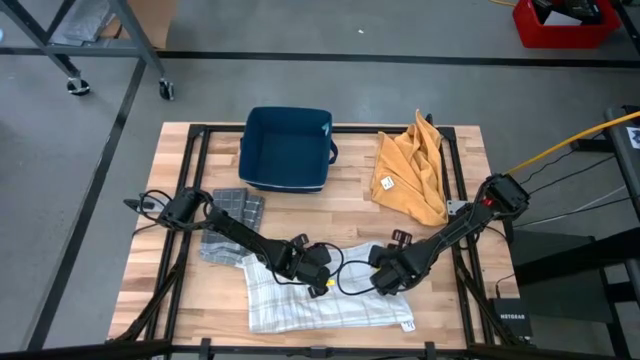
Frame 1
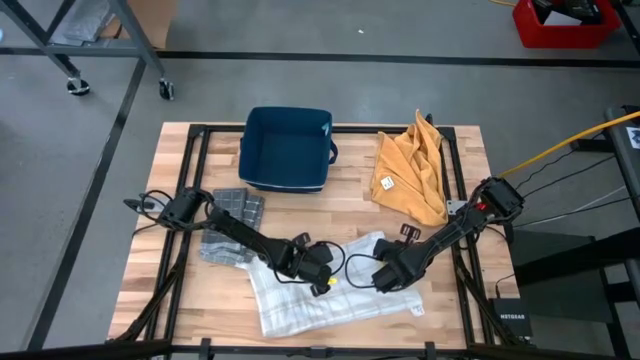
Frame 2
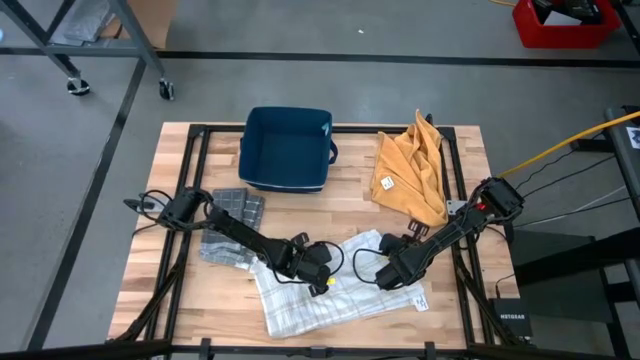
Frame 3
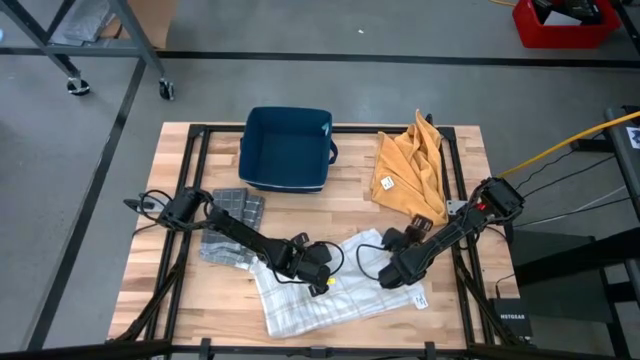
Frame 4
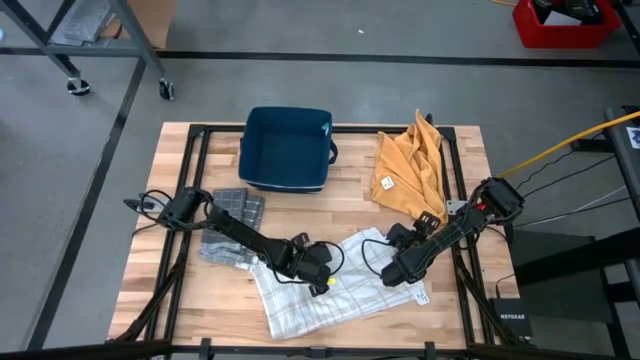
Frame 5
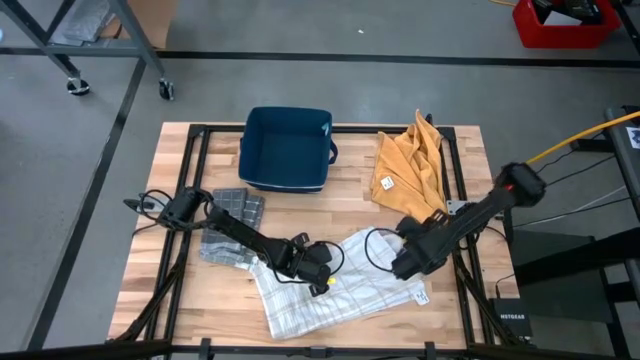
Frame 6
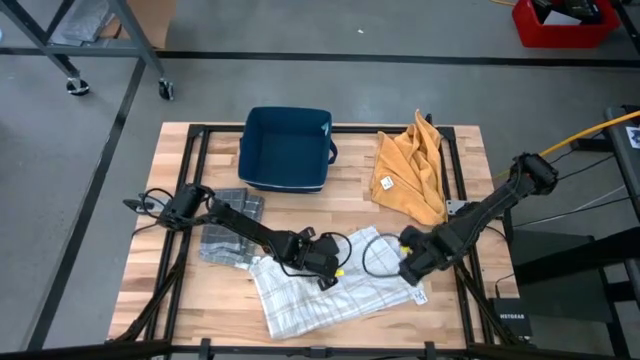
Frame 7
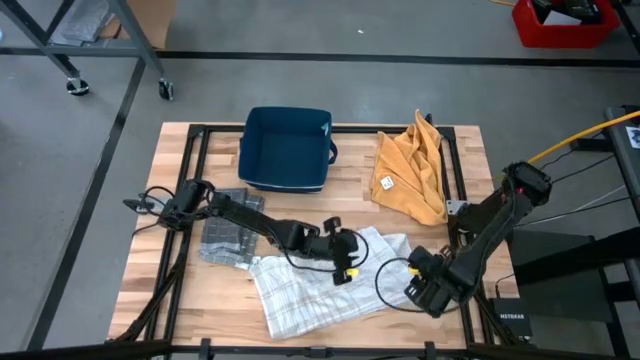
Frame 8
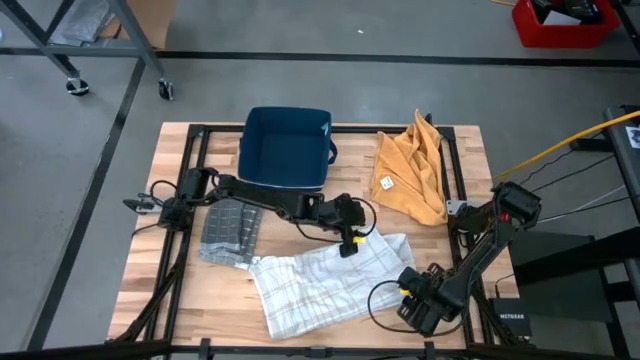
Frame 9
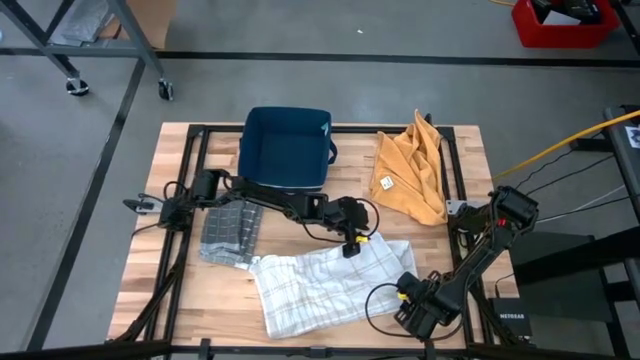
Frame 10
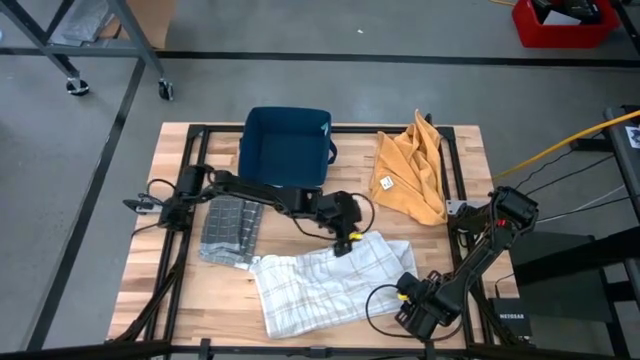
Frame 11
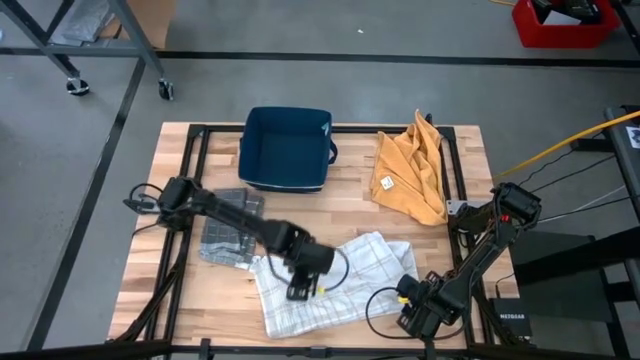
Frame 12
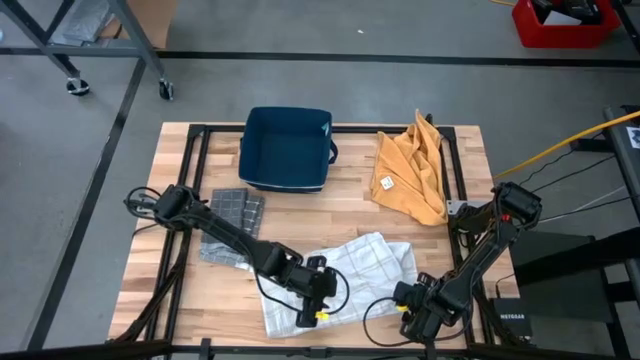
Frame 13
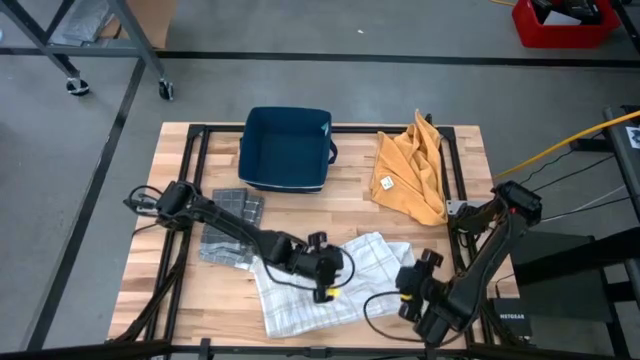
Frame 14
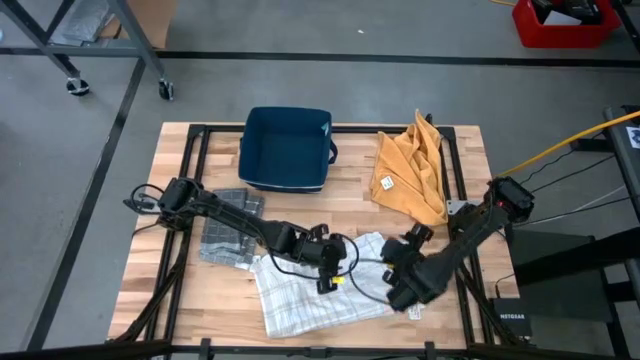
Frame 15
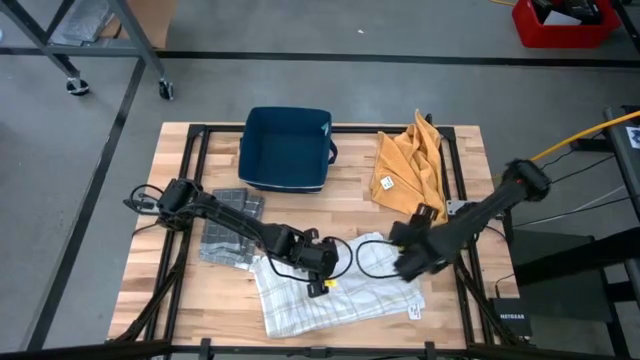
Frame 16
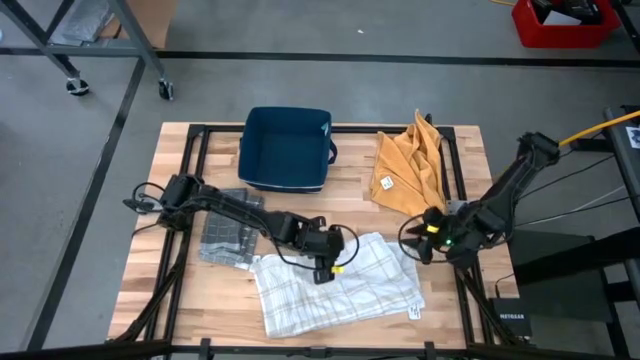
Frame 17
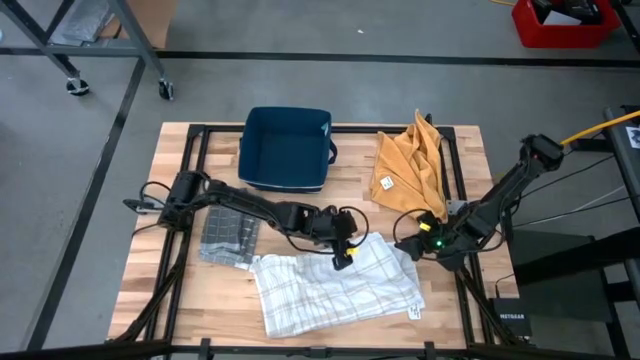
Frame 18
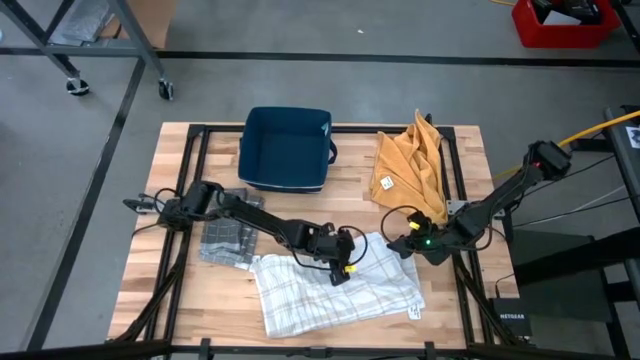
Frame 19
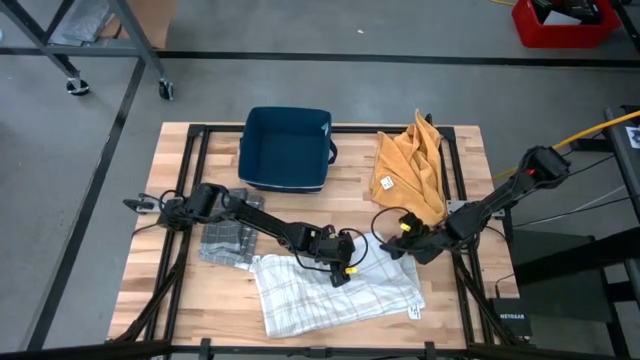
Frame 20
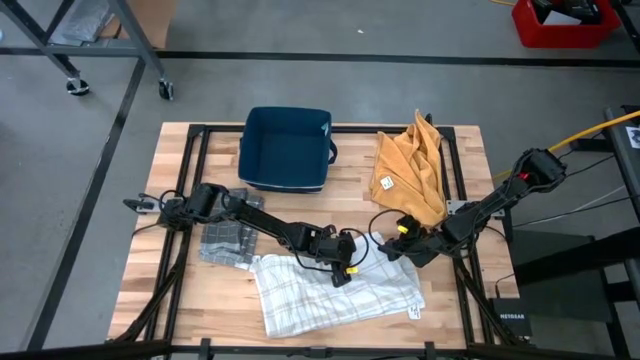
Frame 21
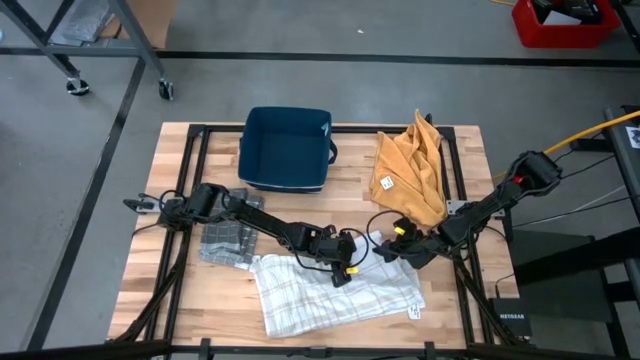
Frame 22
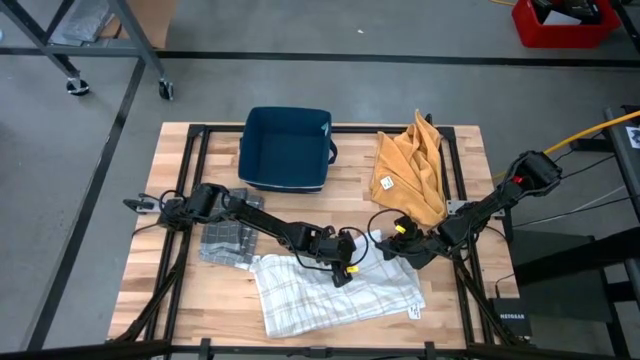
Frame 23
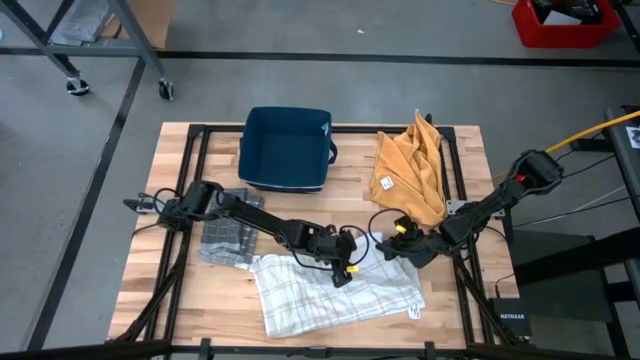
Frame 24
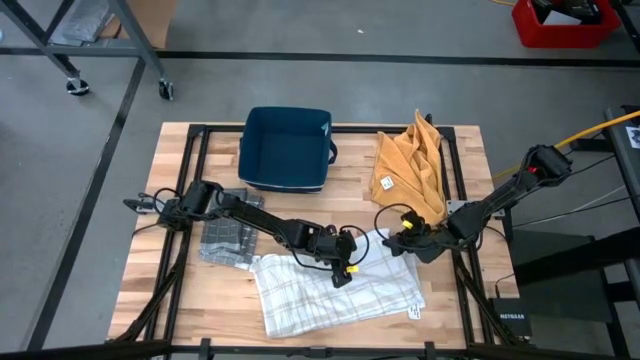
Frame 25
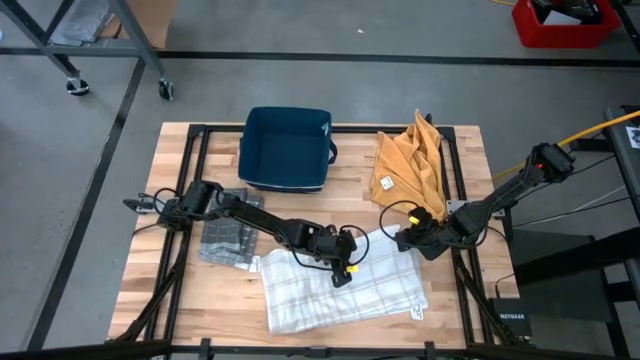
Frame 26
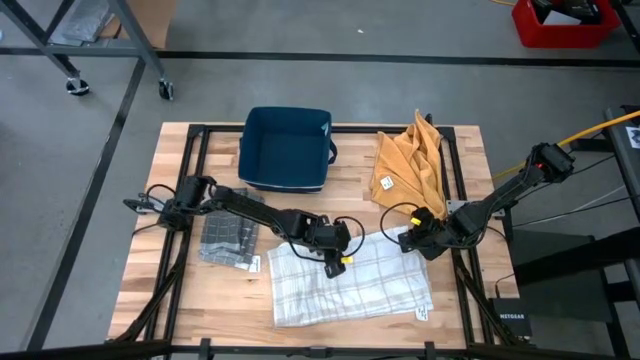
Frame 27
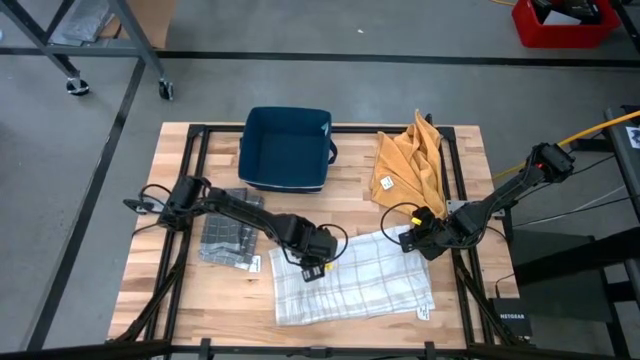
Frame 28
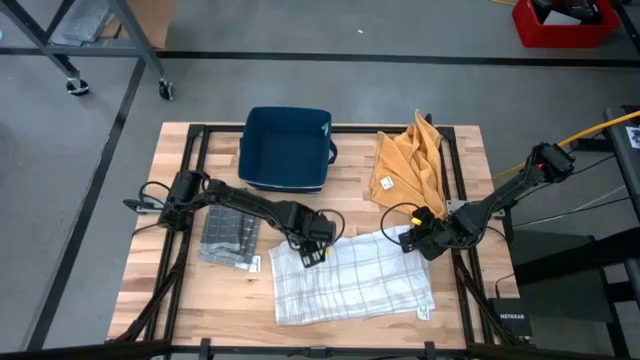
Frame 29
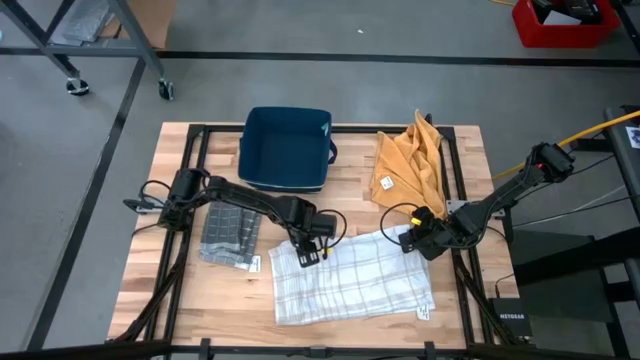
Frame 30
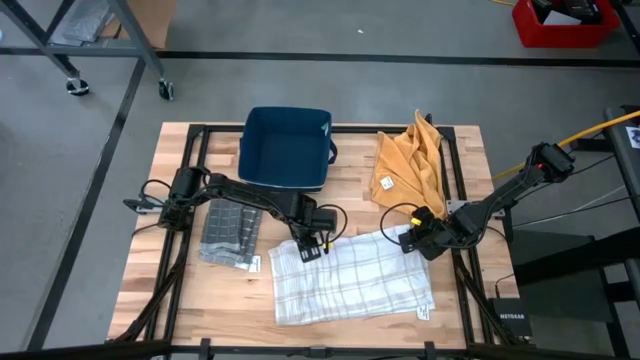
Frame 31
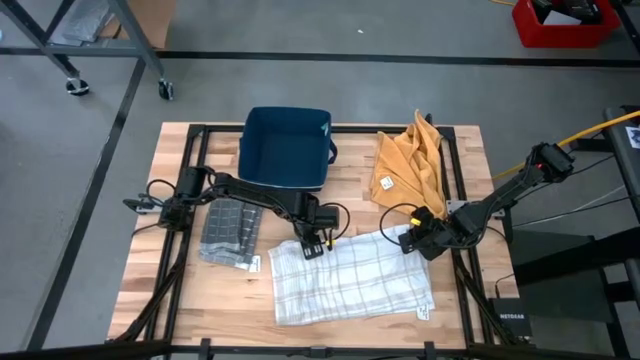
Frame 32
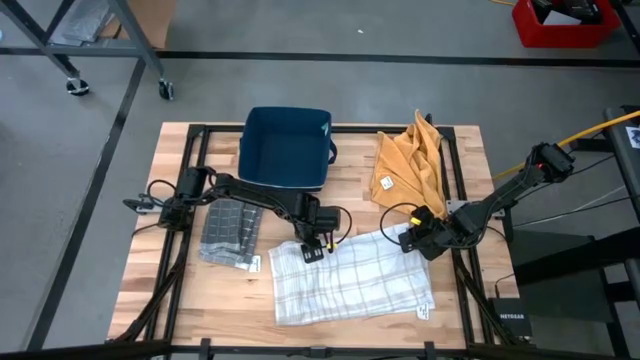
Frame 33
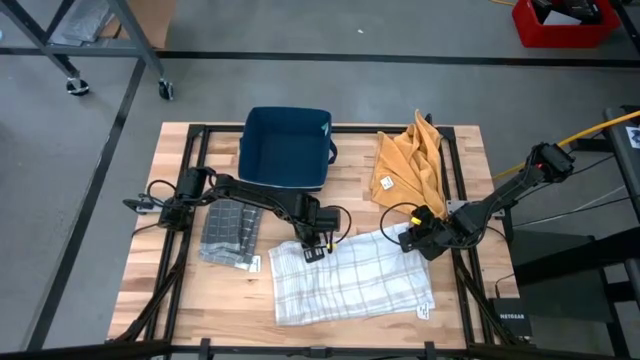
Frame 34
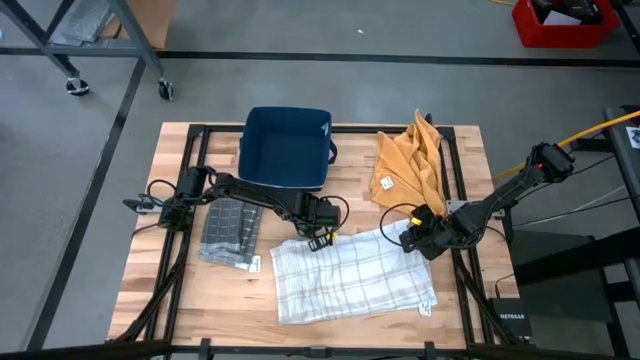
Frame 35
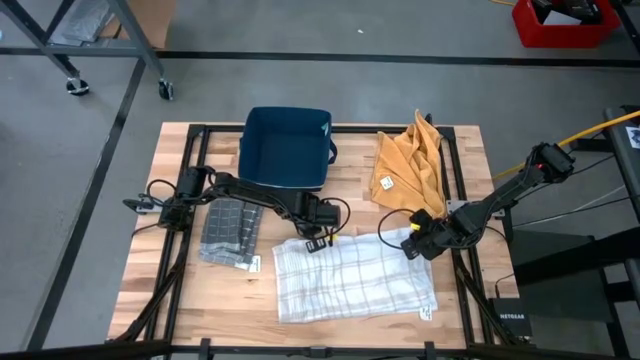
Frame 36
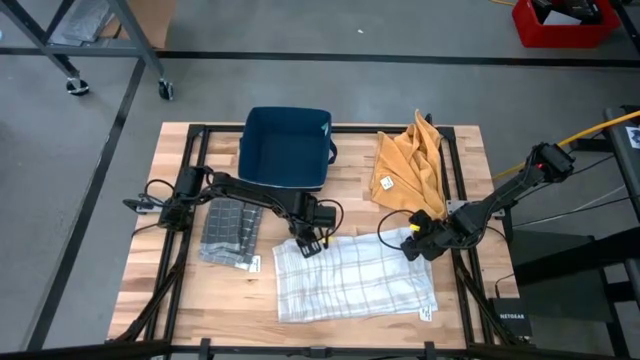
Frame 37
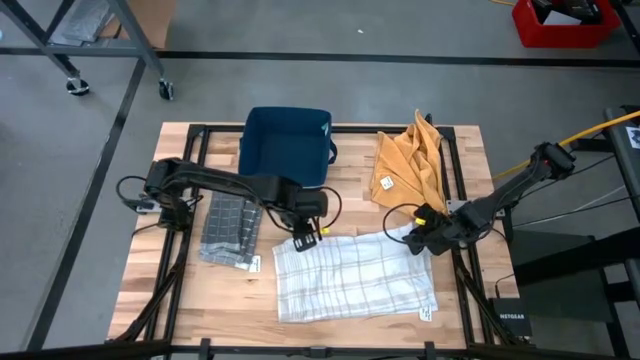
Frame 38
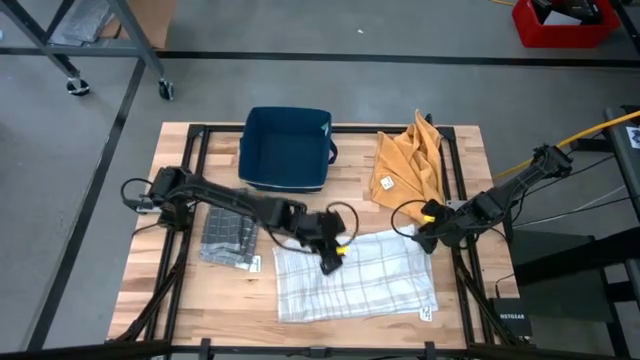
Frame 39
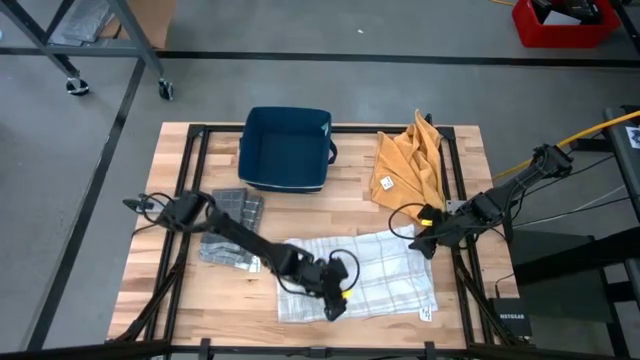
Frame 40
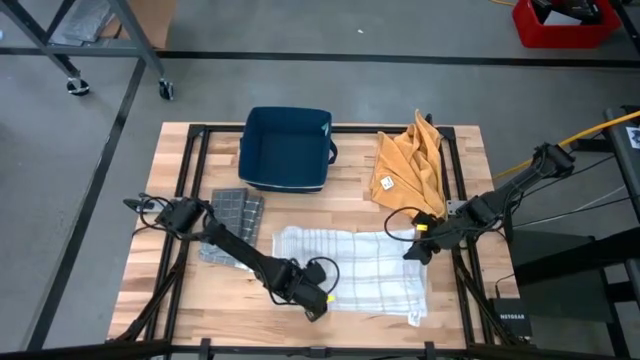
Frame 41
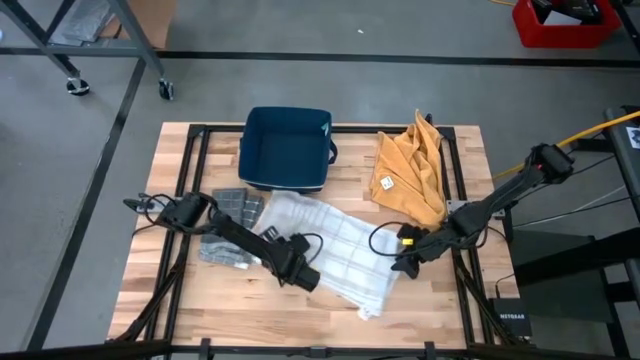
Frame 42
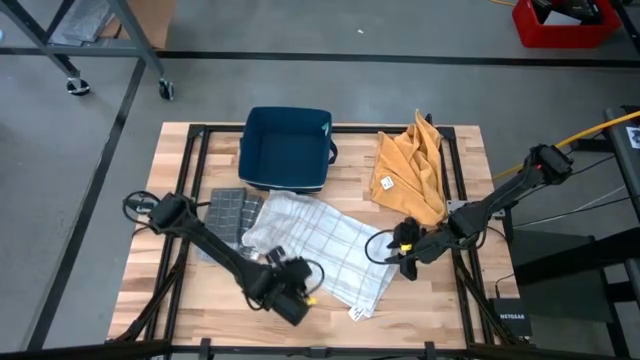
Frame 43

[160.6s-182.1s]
Task: Fold towel
Fold the white patterned towel
